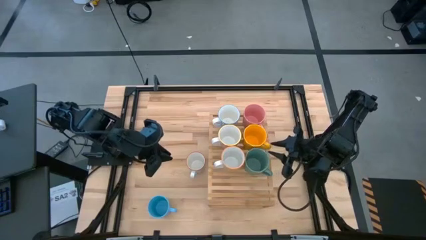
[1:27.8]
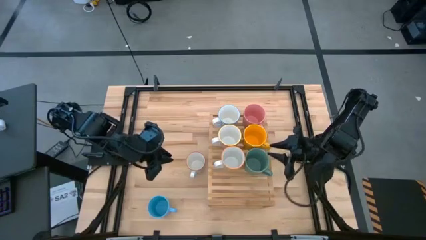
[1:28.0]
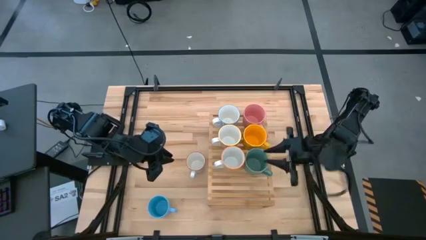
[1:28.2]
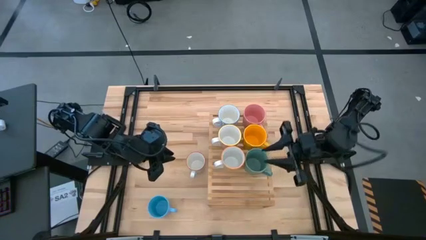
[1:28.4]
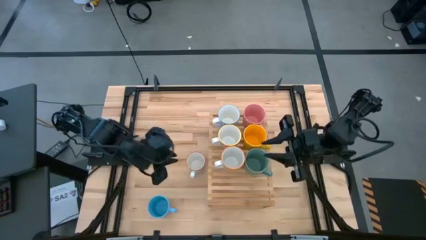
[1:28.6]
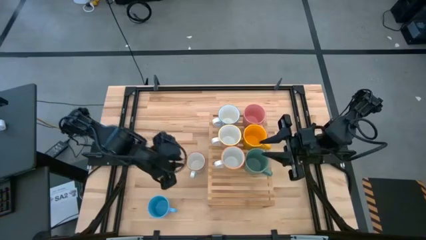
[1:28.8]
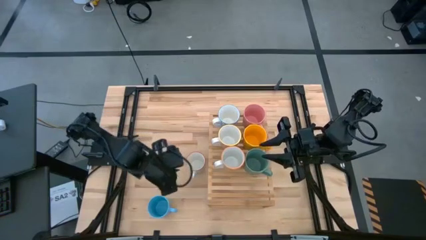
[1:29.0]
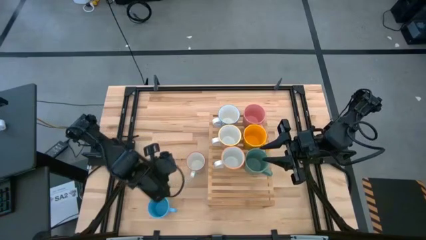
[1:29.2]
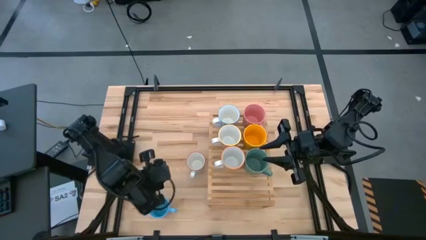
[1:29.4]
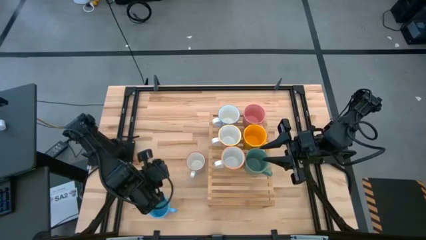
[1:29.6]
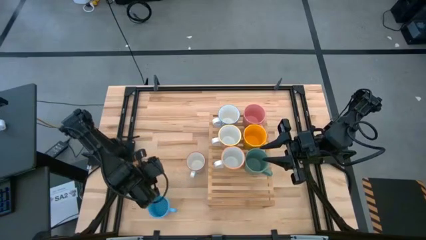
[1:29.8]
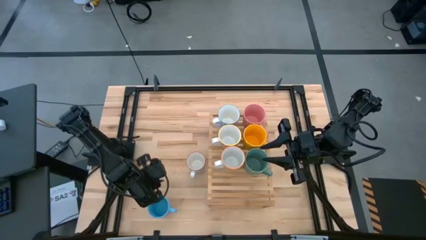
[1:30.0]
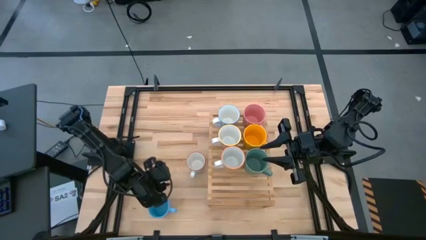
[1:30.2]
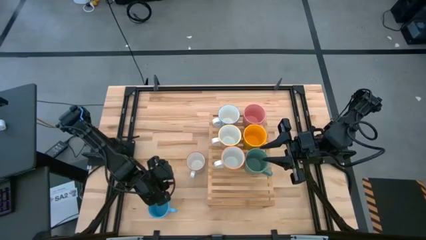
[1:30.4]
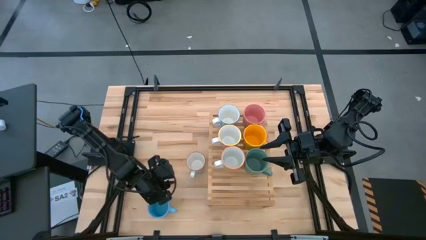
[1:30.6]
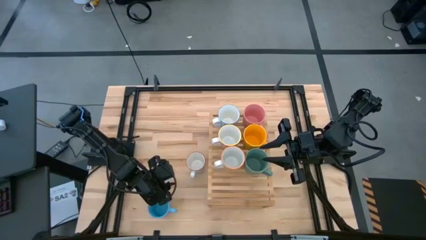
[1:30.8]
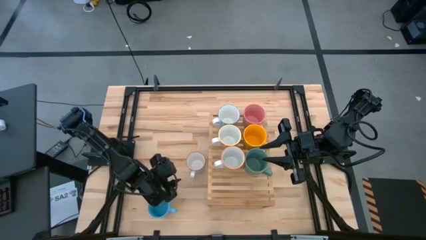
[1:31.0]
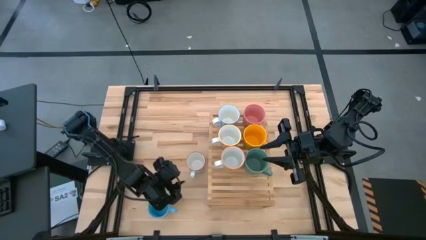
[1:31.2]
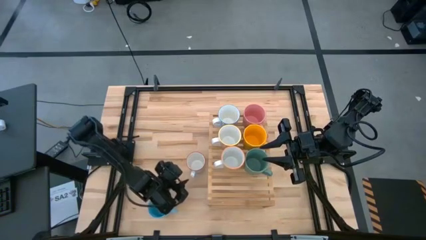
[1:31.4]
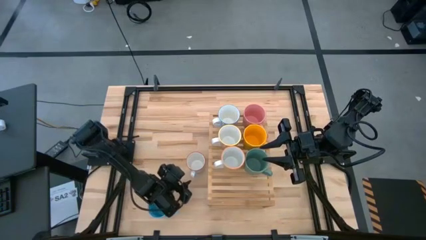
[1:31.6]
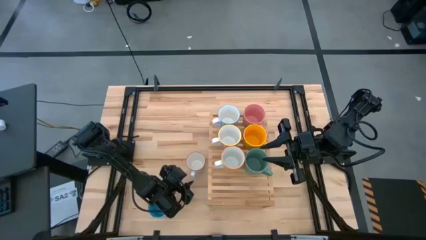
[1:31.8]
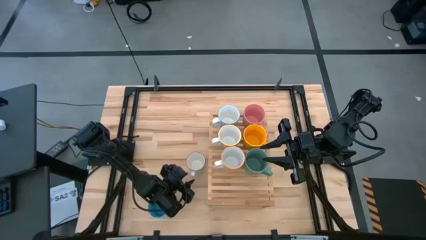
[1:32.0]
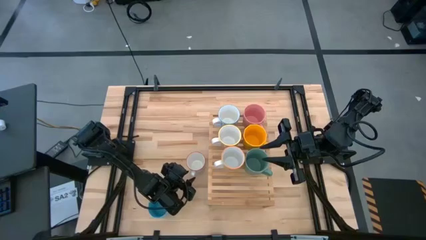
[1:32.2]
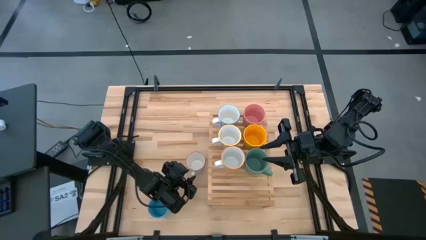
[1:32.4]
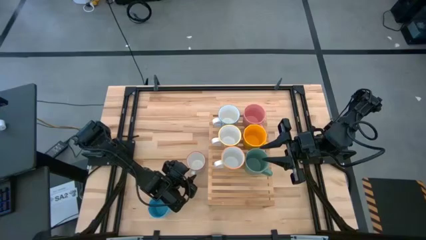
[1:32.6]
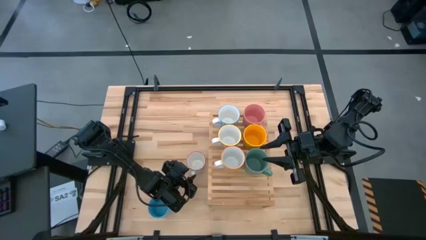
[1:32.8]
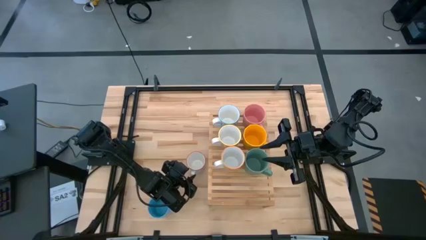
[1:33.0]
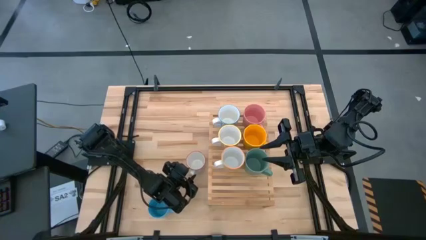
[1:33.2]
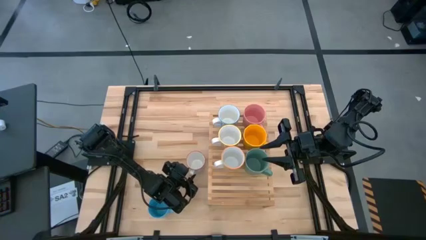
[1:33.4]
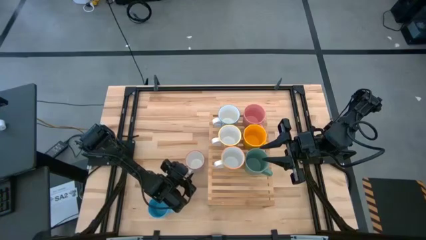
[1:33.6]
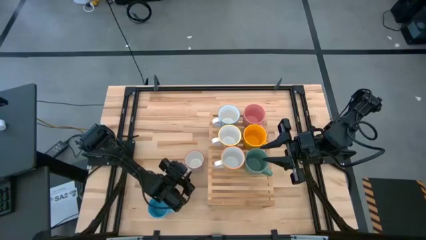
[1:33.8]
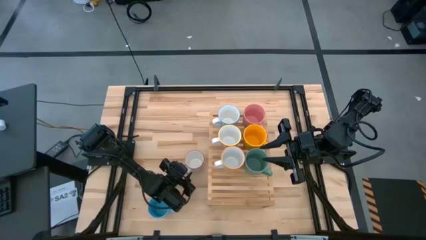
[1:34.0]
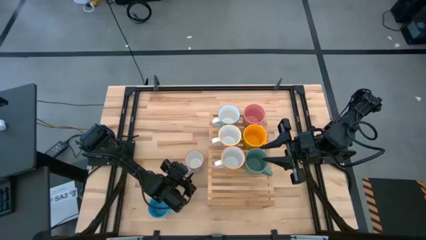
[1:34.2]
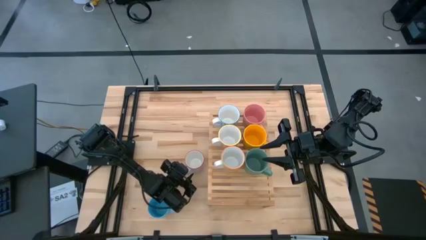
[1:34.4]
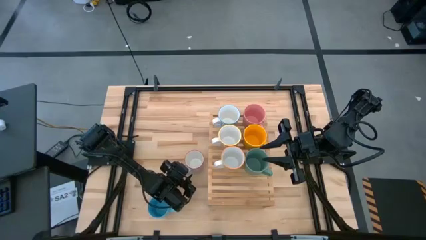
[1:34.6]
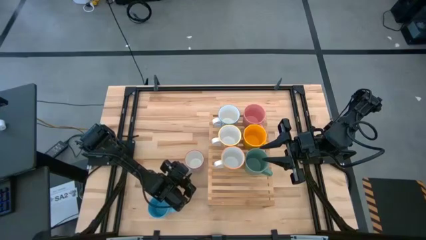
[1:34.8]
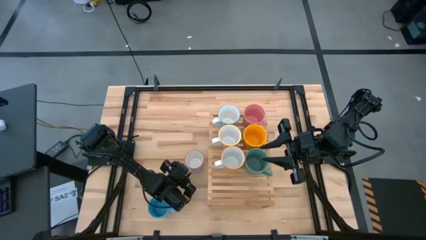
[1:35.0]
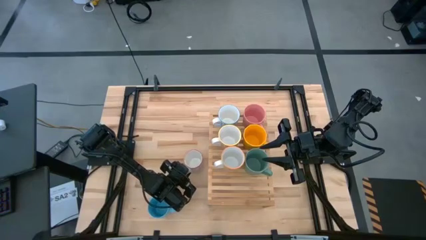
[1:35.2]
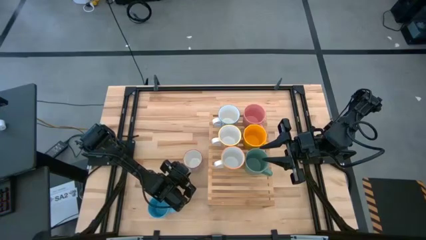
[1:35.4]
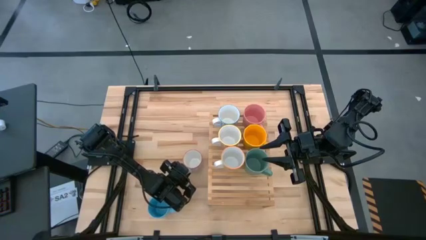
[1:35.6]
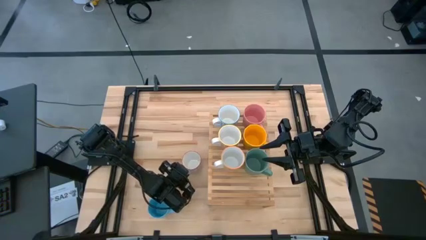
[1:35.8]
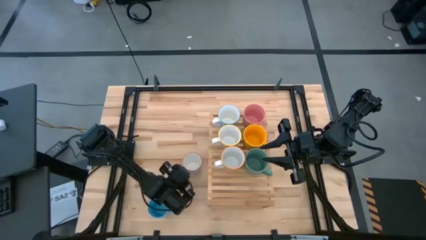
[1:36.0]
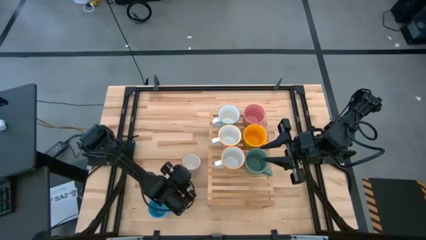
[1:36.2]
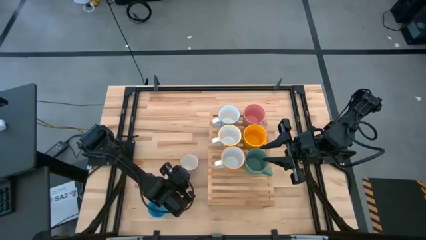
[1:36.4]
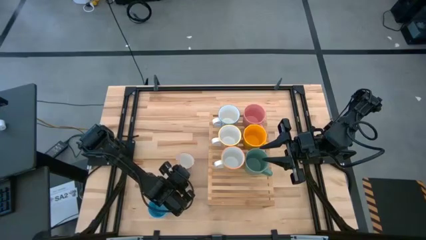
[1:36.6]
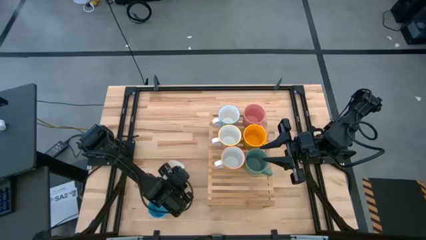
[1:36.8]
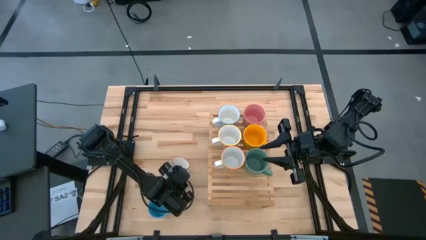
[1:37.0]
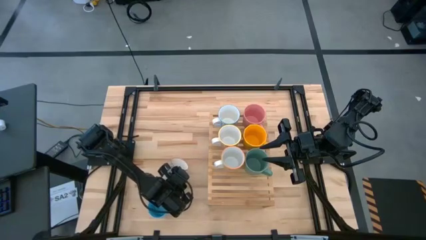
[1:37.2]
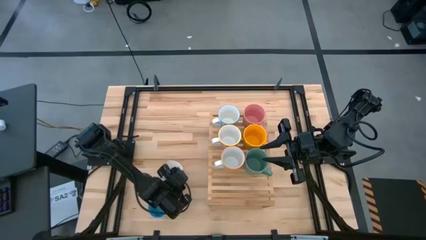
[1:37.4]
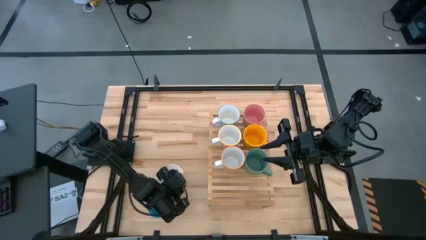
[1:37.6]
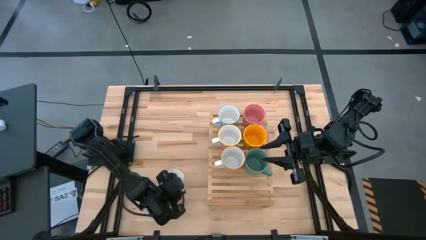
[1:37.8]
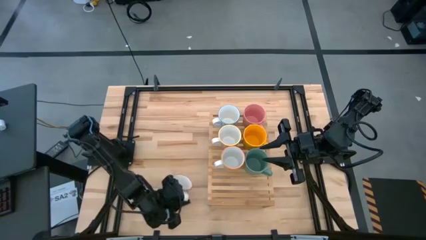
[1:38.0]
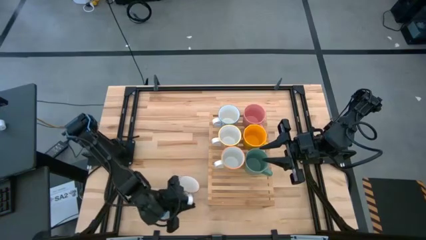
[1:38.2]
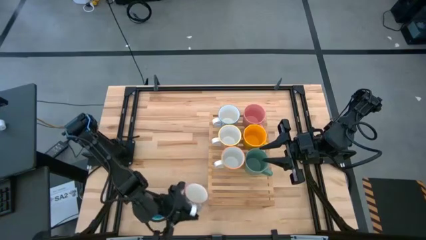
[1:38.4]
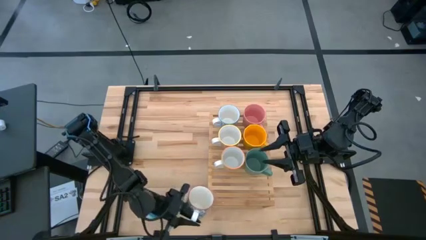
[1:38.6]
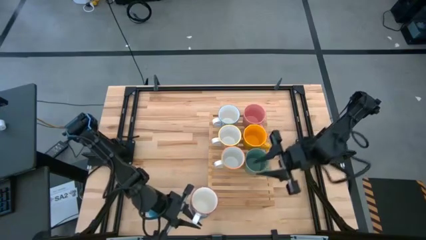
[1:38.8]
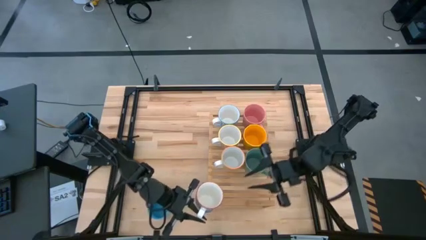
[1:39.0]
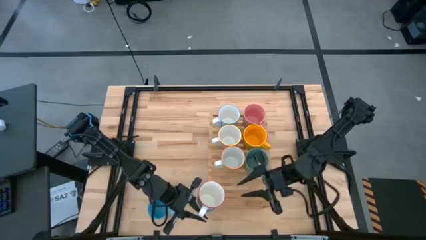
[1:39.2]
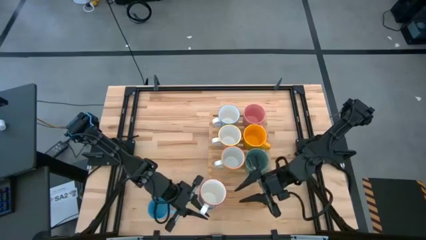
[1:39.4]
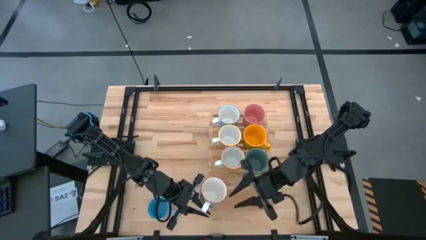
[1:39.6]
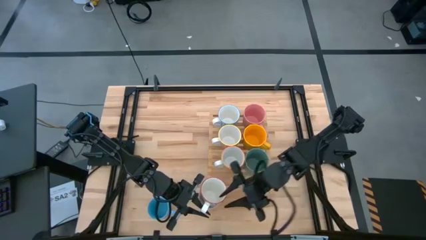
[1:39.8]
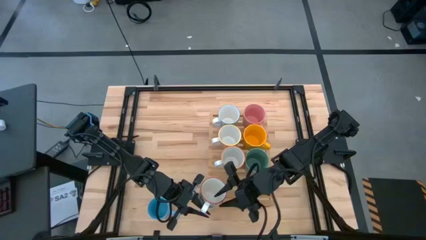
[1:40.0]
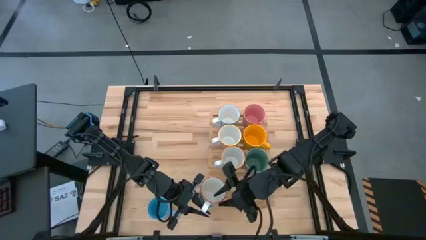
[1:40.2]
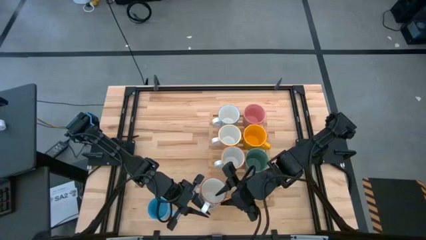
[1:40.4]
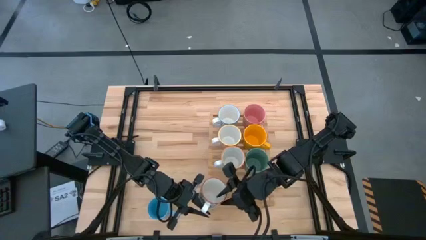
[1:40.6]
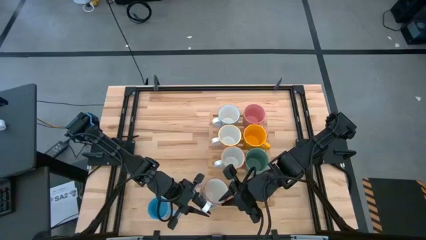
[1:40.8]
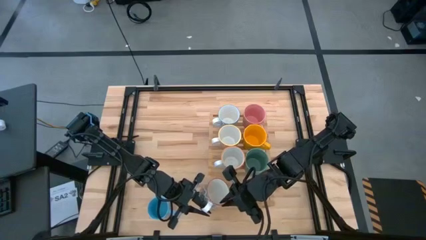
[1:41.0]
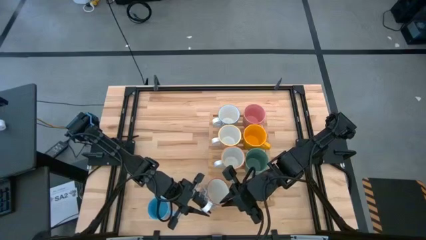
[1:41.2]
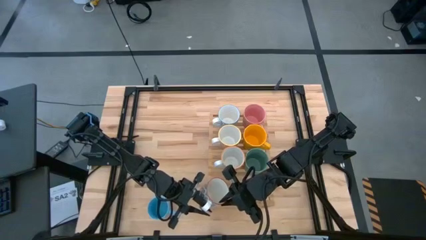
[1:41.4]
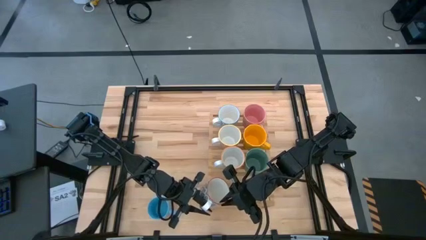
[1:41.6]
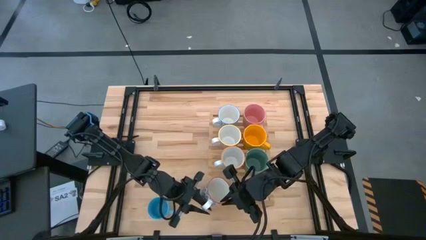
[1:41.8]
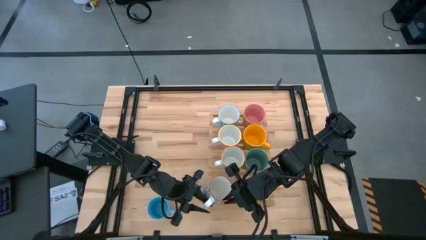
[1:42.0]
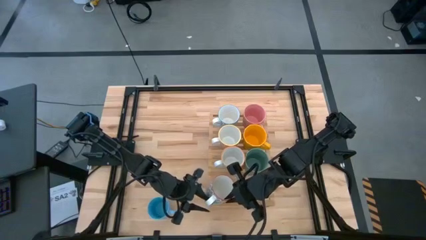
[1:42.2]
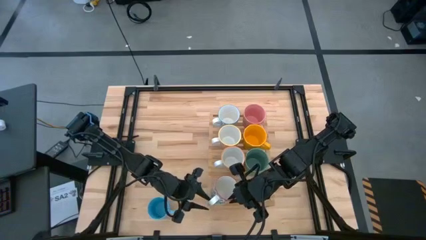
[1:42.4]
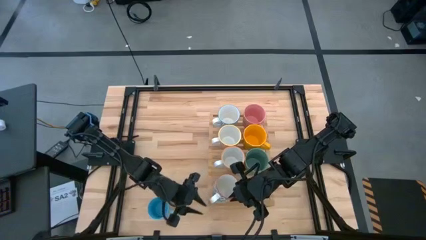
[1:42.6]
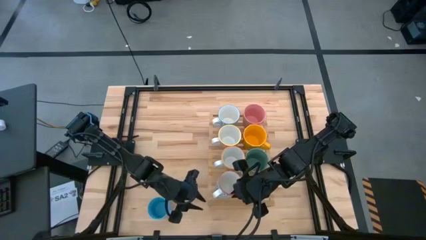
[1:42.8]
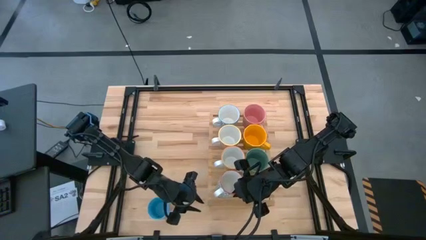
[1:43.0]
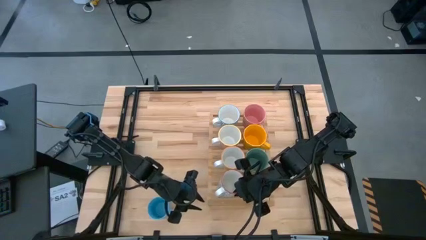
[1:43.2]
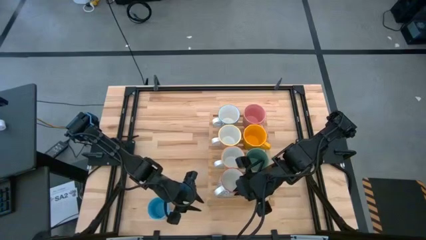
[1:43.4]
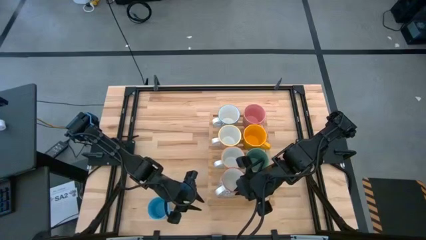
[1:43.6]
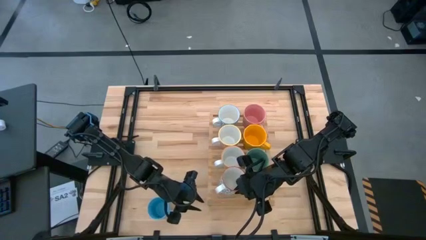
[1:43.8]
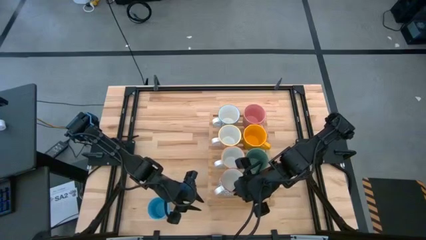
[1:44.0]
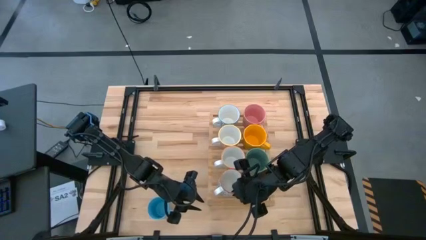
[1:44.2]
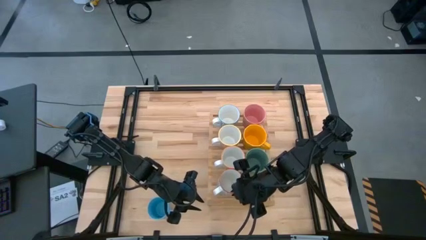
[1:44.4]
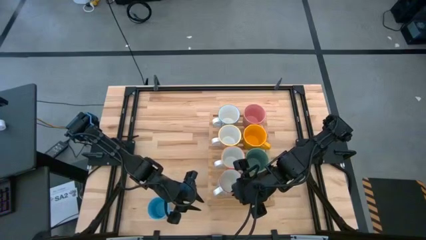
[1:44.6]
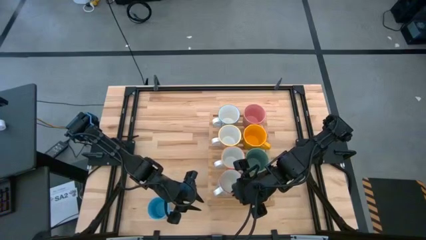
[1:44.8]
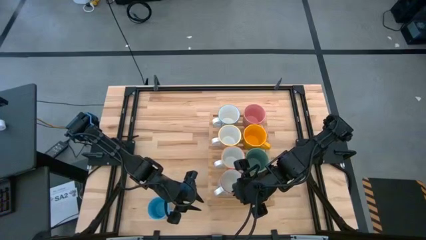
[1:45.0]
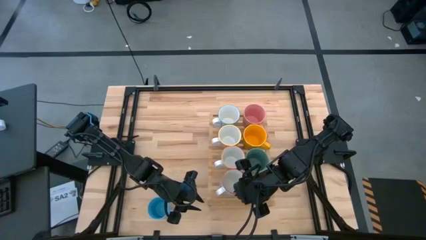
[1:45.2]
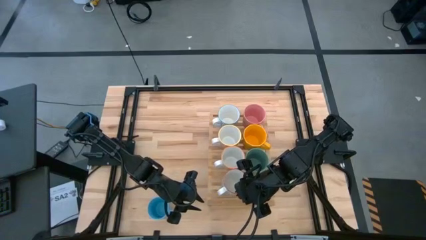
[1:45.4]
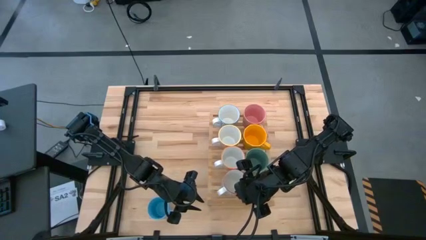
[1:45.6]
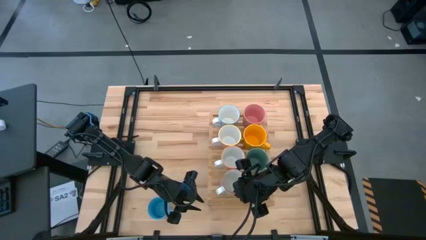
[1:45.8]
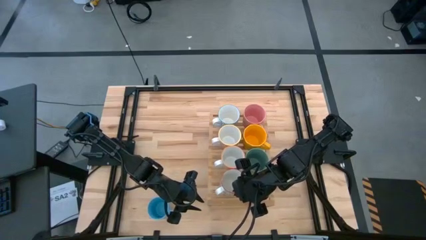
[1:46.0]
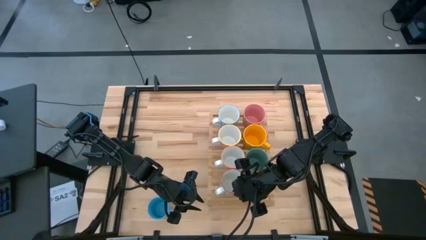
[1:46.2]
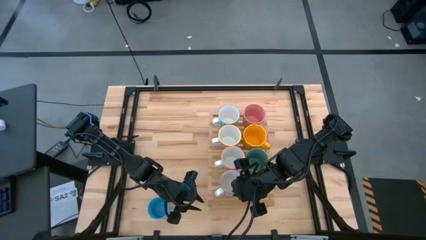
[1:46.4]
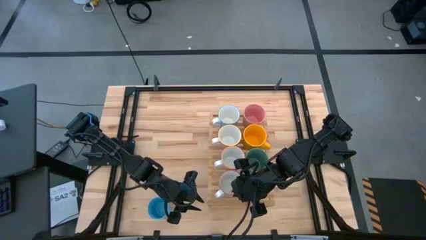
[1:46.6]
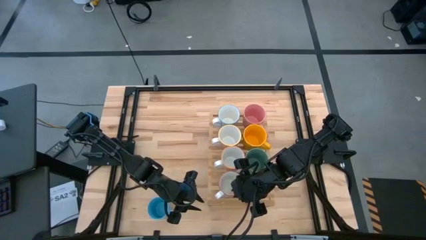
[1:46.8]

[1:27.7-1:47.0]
Task: Place coffee mugs
Put the gray patterned mug on the shelf
